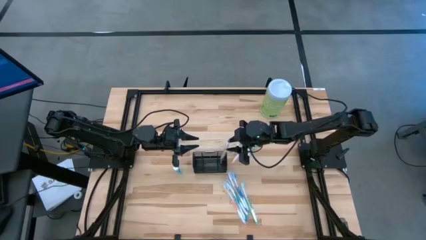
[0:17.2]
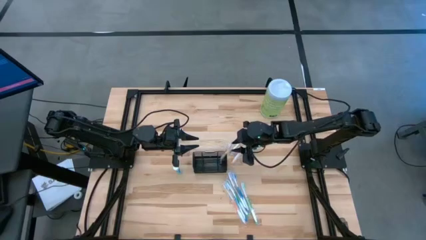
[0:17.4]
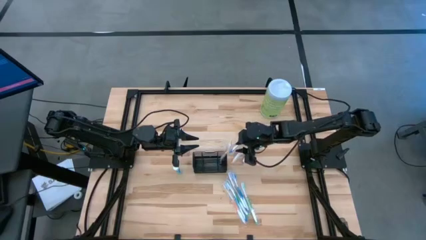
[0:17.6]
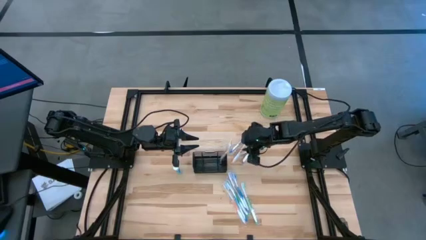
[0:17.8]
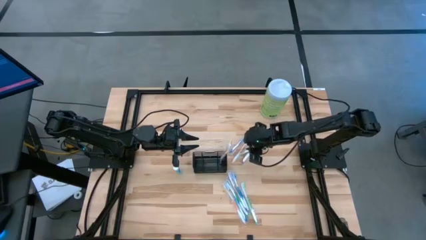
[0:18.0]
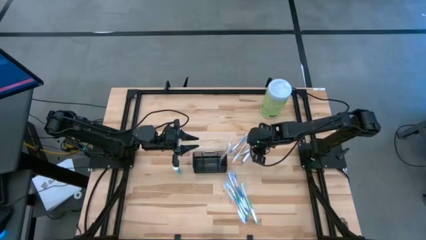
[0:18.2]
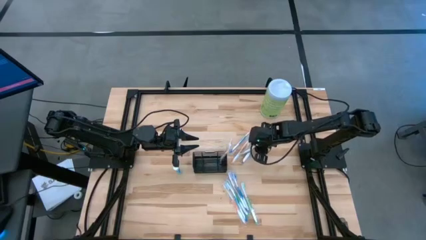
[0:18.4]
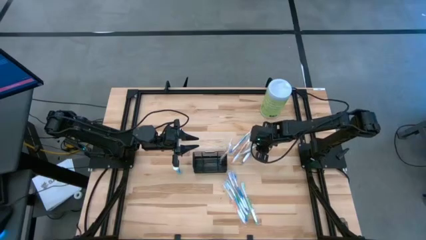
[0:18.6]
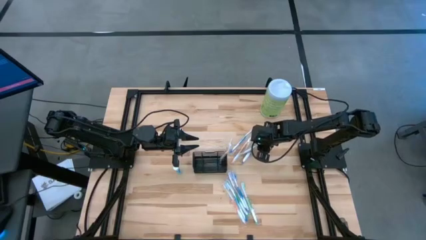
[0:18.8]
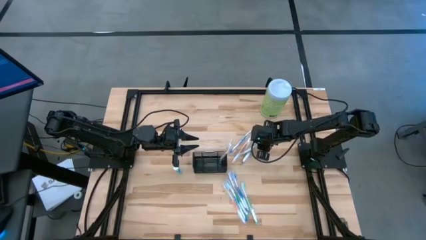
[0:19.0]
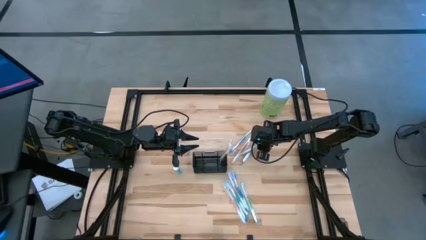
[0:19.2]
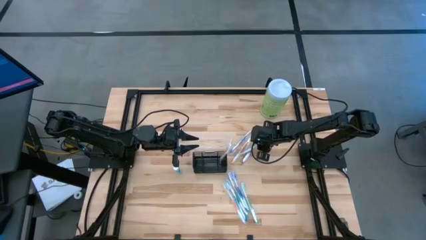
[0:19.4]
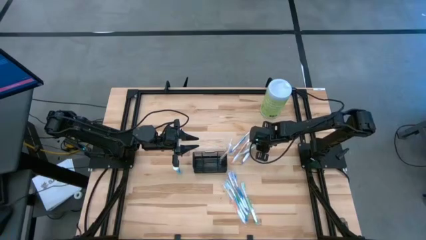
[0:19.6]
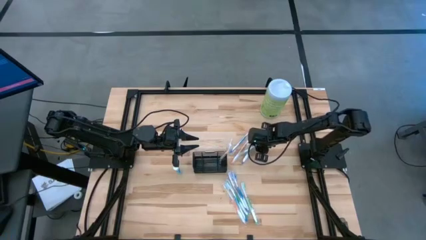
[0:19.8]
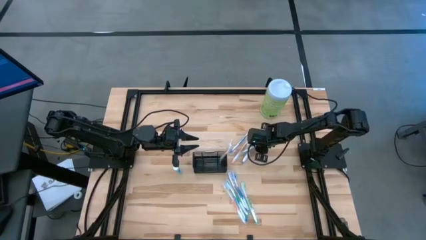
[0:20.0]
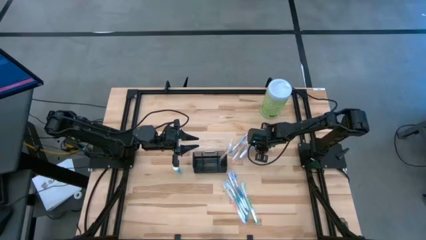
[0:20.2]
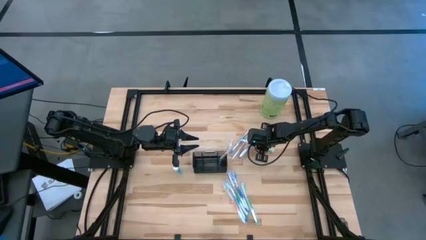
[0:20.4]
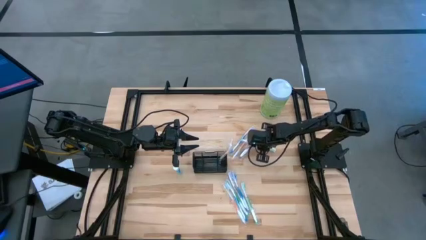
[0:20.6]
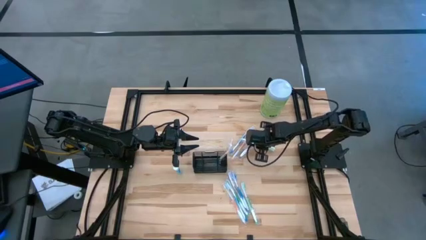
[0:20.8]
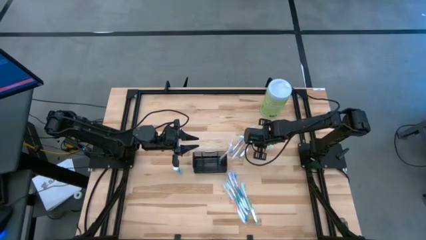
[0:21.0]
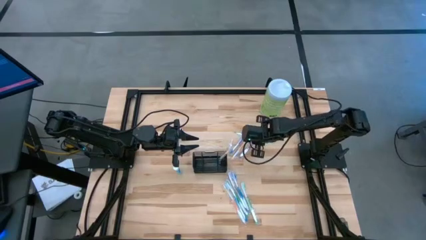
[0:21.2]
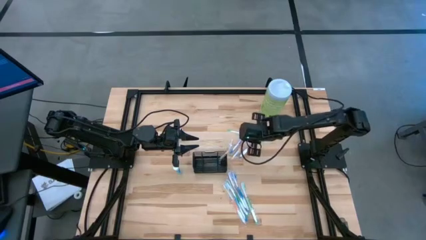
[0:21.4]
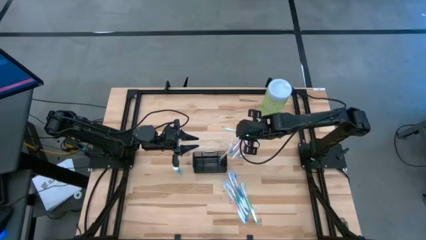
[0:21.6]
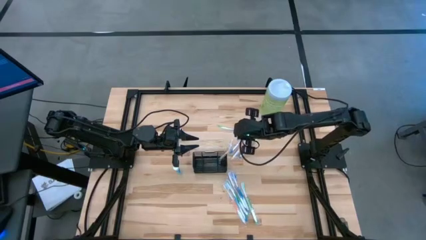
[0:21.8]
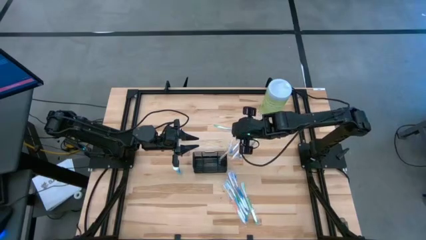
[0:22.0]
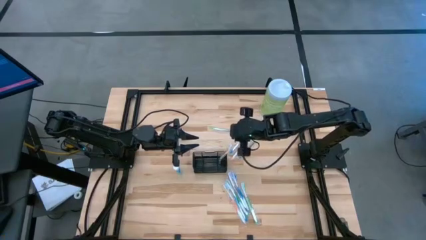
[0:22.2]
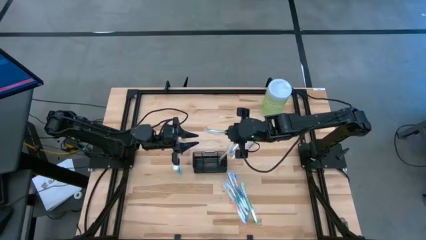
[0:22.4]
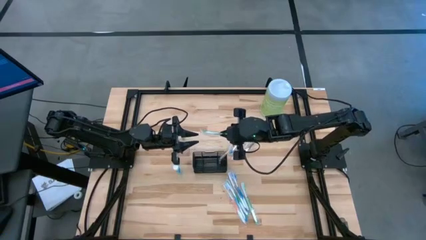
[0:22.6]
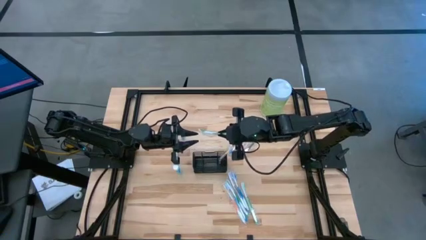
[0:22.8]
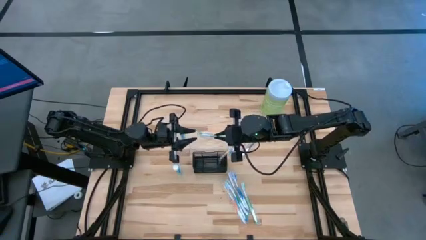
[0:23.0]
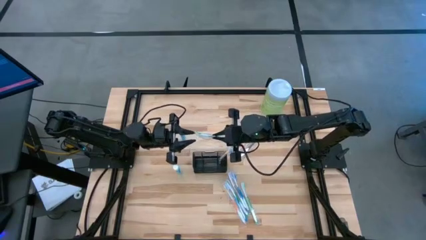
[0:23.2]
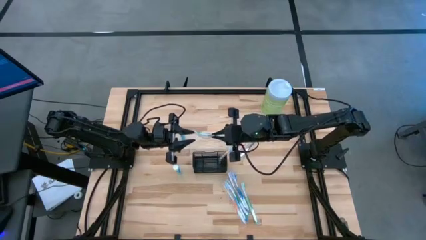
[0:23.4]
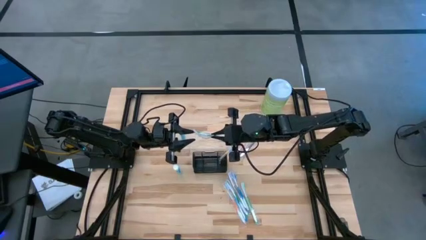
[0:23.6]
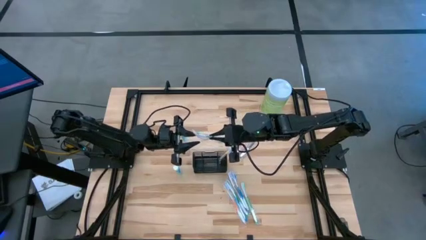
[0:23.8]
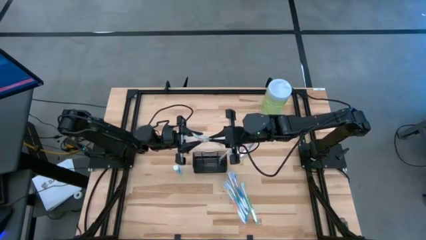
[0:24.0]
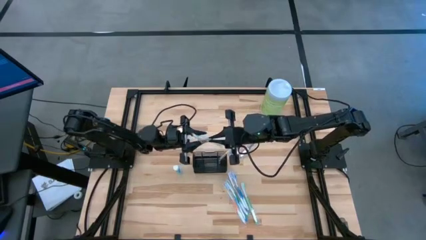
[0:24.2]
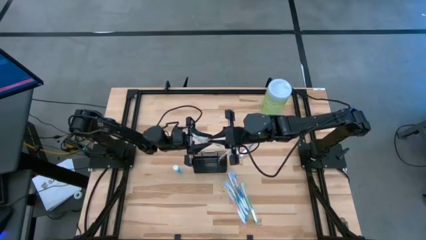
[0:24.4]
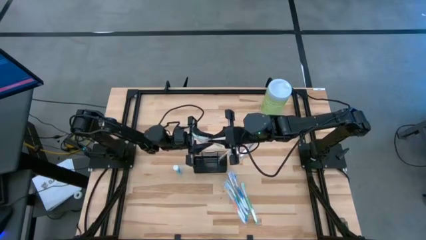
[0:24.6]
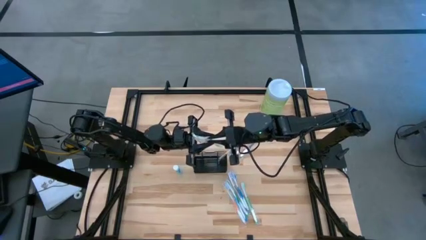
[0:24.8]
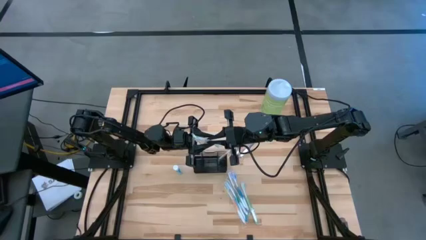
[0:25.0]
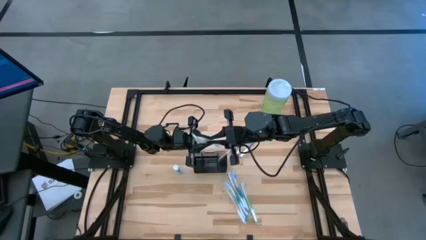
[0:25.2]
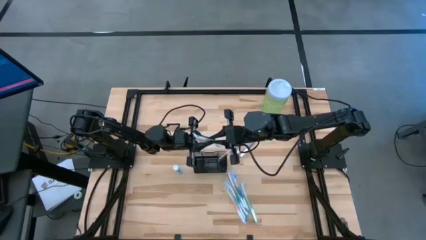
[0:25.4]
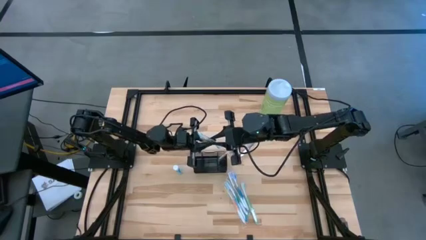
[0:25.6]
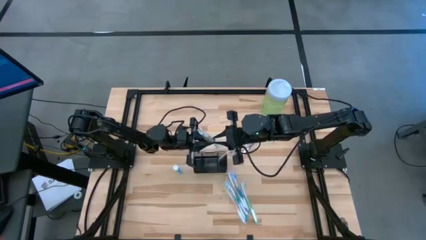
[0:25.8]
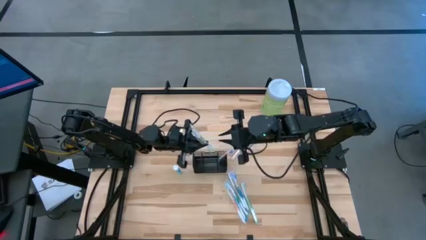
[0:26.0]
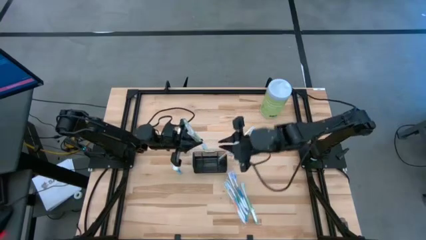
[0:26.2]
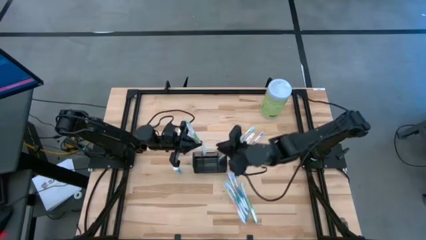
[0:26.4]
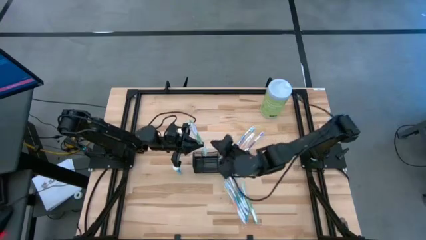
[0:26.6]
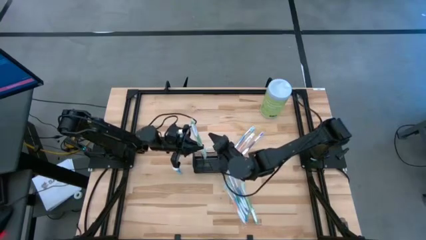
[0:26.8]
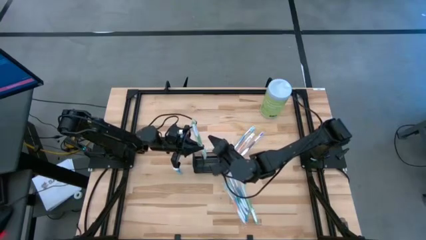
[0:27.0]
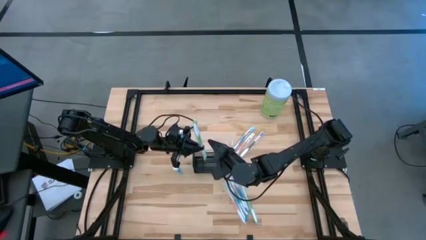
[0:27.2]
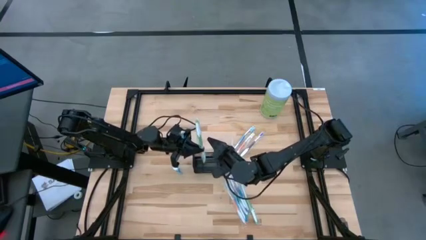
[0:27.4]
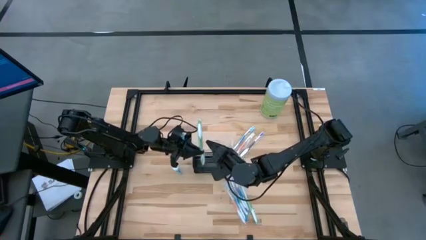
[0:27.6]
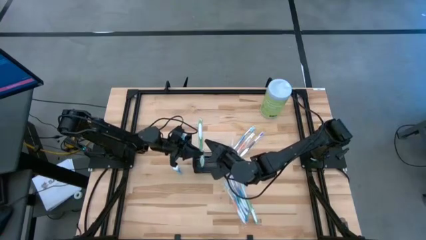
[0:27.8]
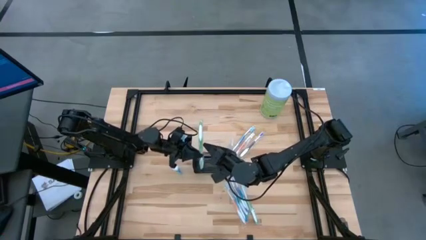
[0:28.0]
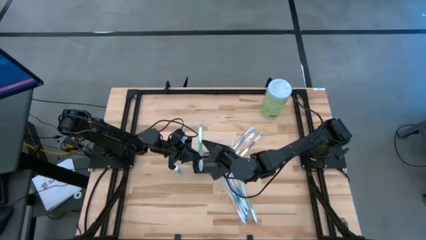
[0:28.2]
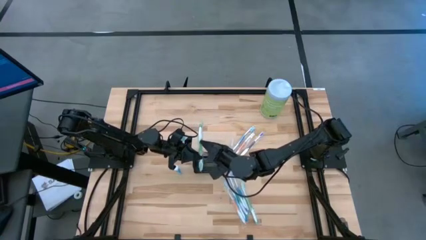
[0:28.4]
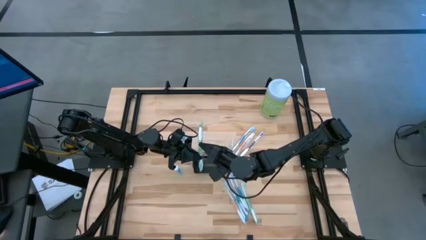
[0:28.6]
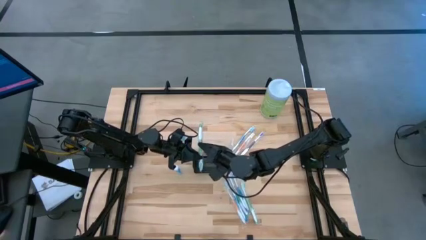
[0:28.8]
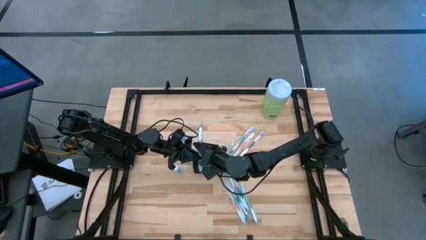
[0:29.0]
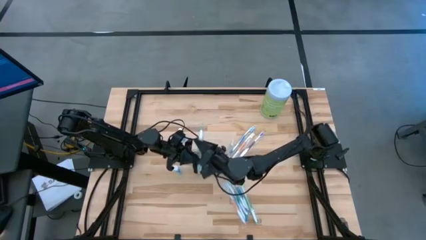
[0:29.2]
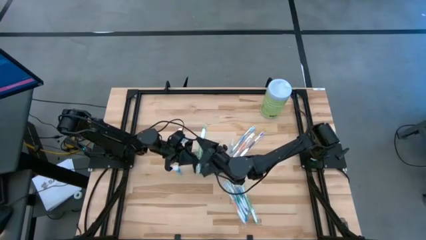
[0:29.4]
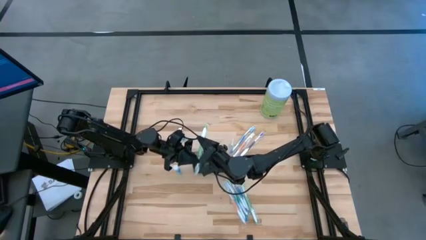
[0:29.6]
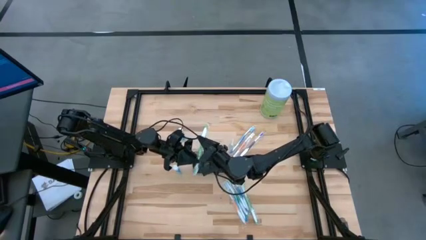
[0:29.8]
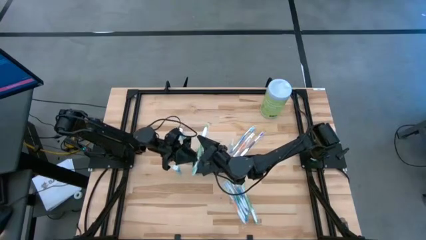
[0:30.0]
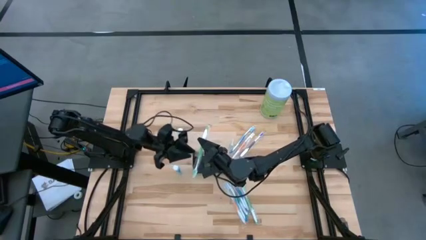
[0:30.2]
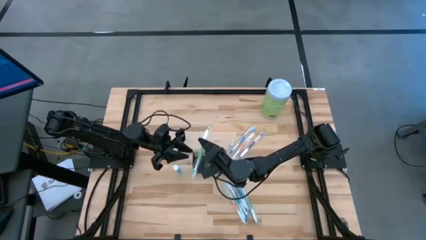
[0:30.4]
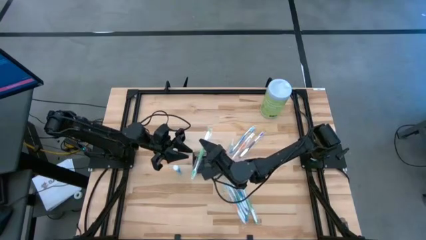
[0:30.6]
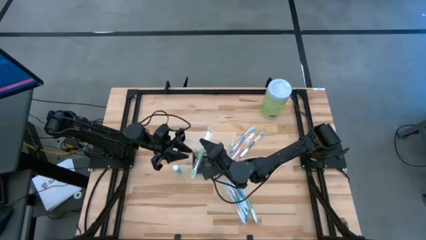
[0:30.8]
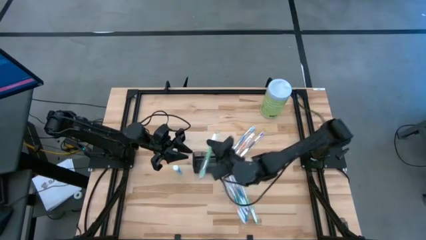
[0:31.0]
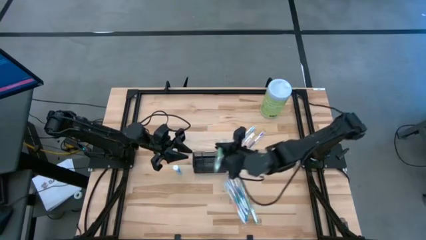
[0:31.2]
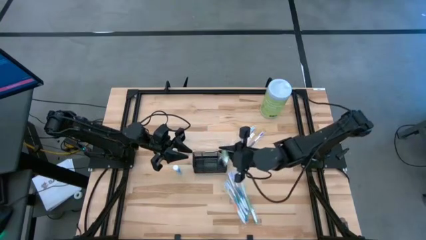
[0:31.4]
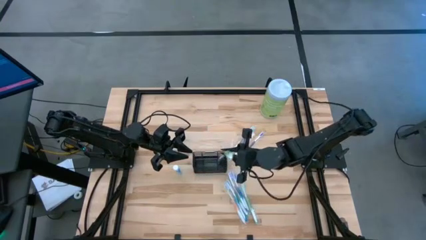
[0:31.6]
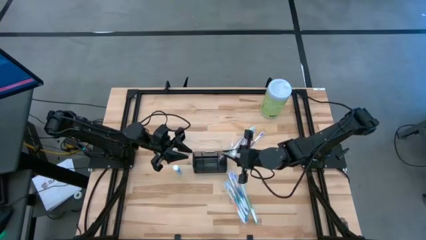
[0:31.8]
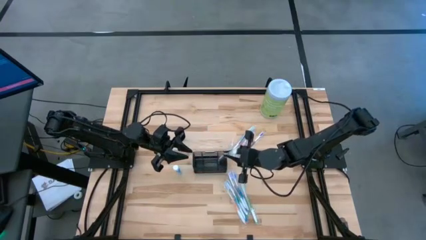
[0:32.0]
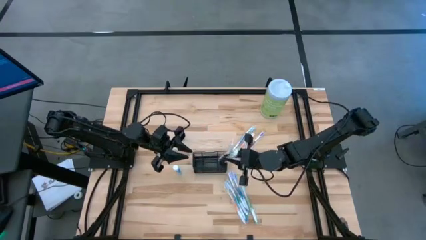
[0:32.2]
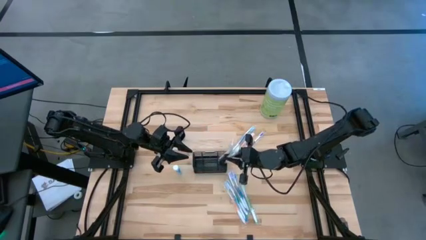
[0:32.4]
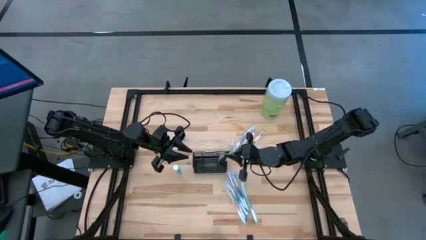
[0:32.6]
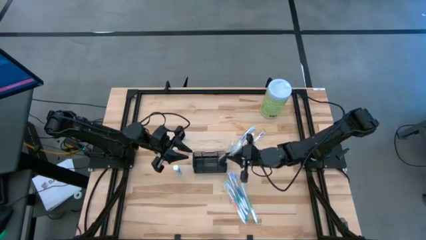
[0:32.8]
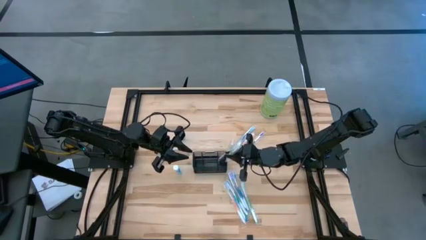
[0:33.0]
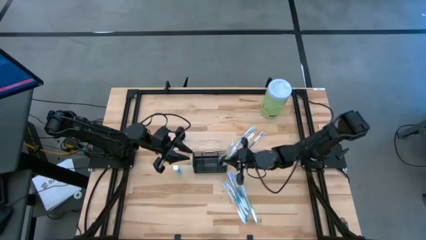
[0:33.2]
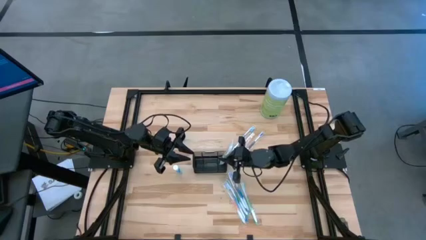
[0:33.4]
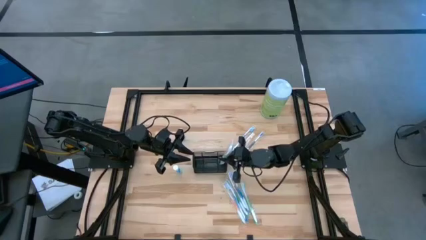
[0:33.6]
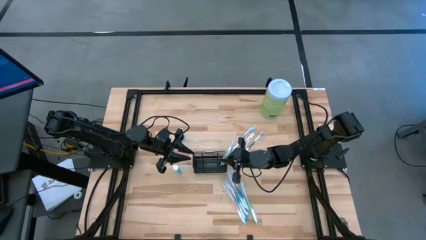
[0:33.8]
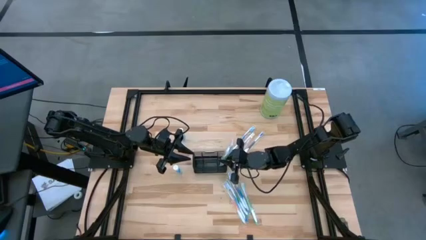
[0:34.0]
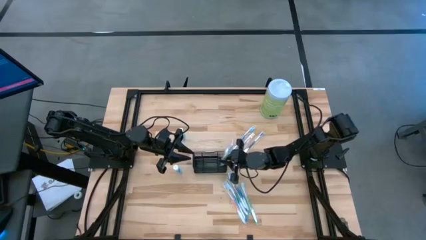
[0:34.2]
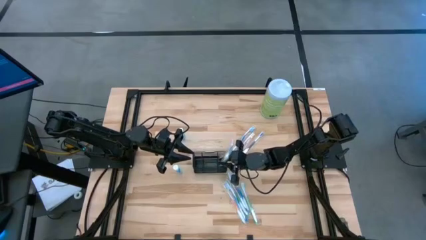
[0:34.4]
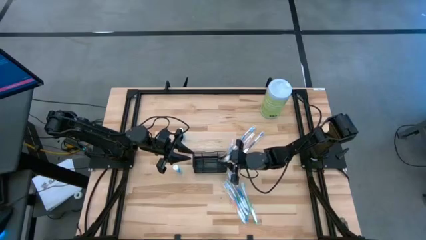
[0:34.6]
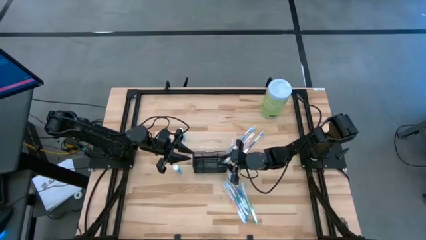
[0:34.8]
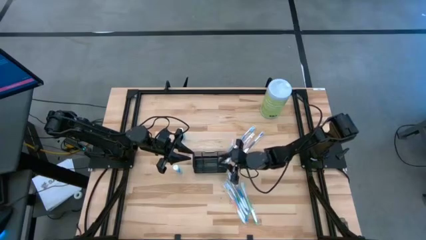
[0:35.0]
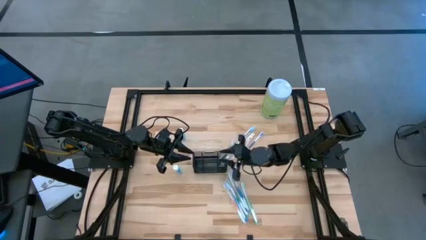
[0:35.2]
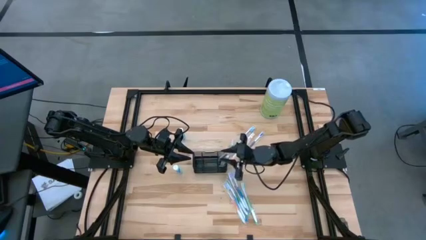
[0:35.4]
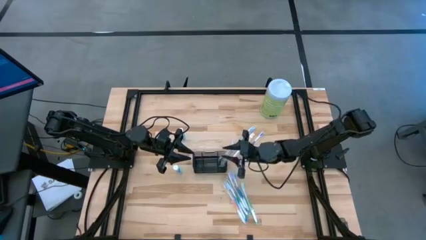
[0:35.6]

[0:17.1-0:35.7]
Task: Pick & Place toothbrushing station
Put the green toothbrush into the mesh
